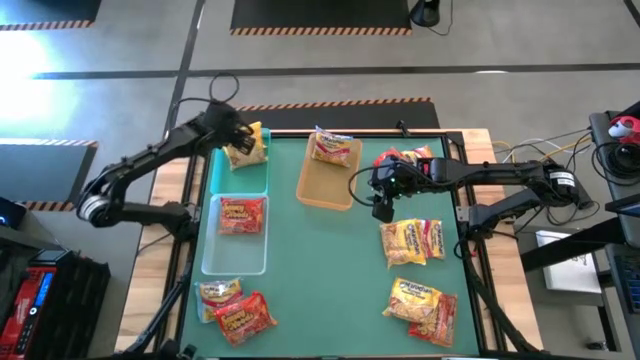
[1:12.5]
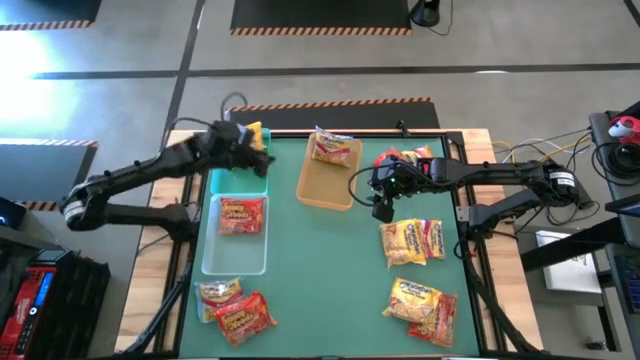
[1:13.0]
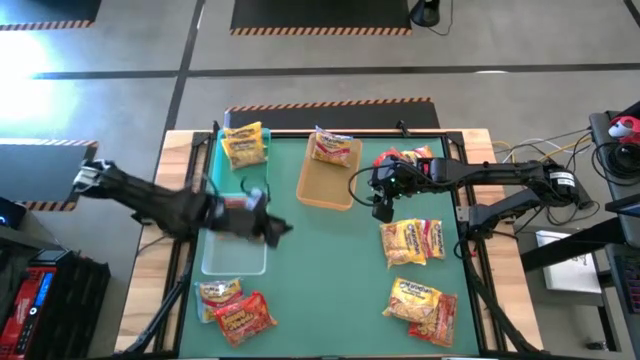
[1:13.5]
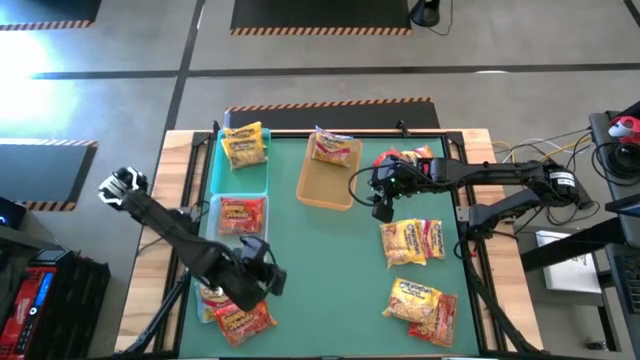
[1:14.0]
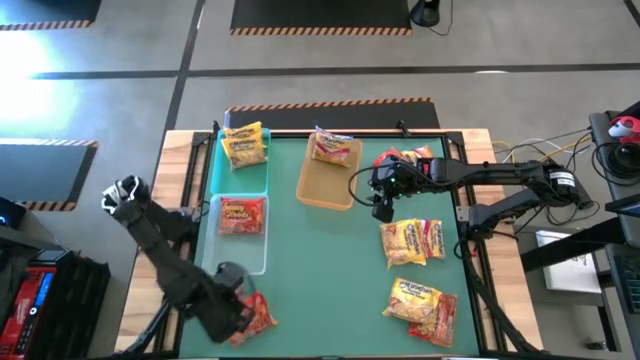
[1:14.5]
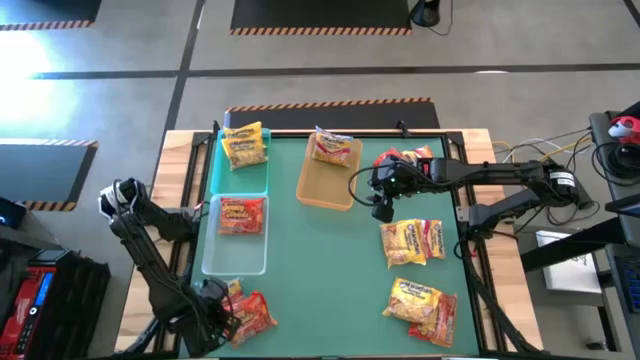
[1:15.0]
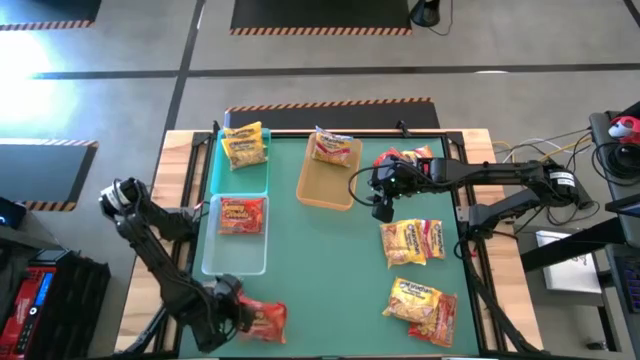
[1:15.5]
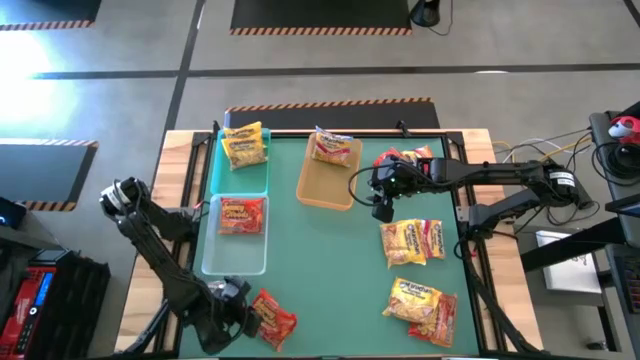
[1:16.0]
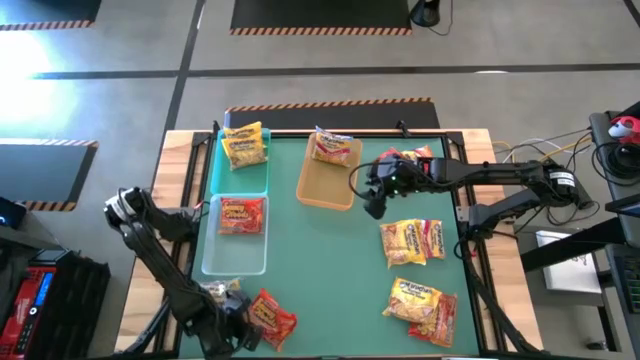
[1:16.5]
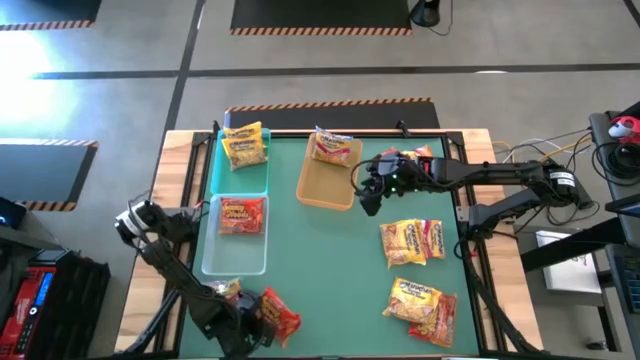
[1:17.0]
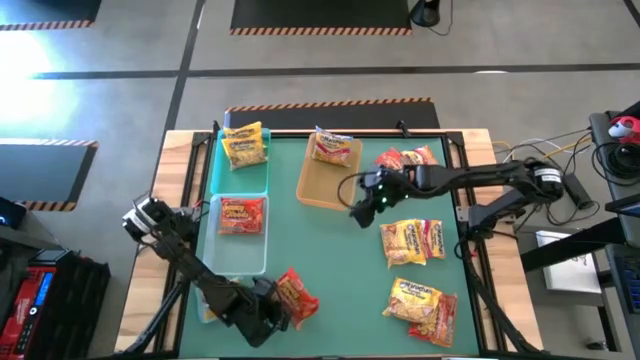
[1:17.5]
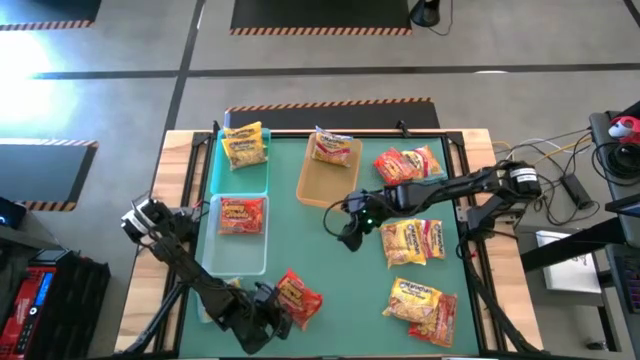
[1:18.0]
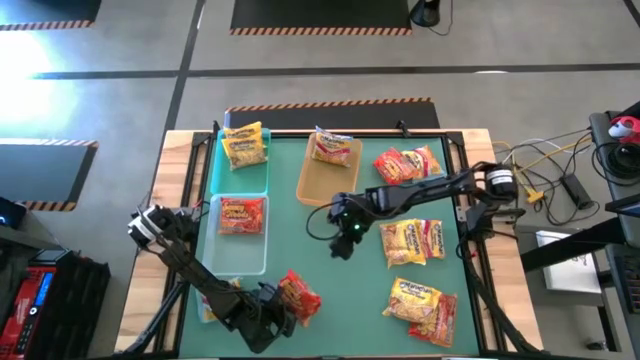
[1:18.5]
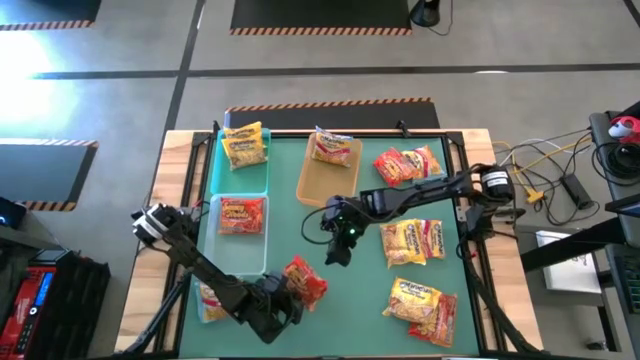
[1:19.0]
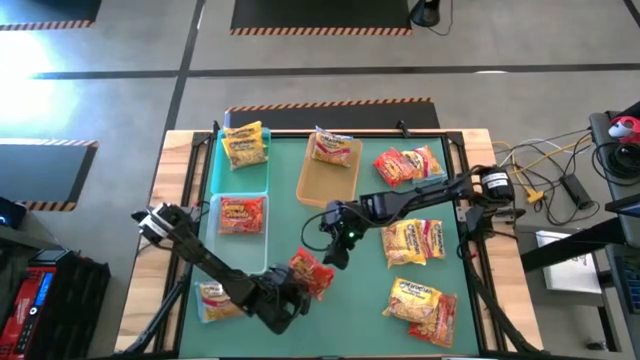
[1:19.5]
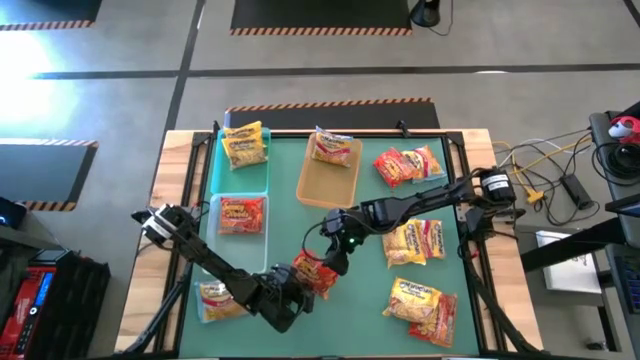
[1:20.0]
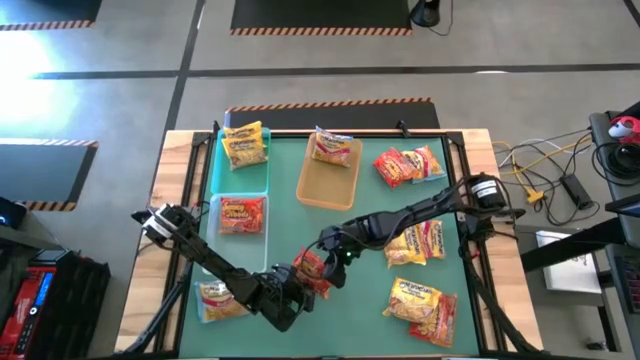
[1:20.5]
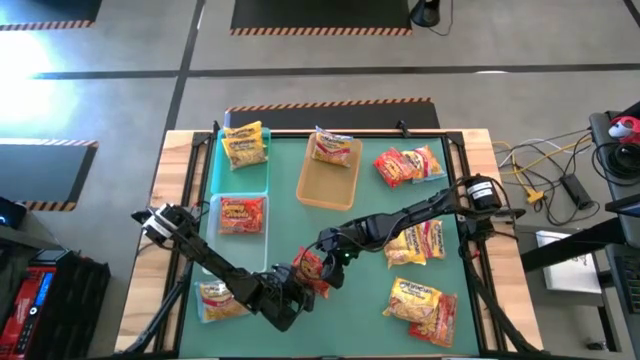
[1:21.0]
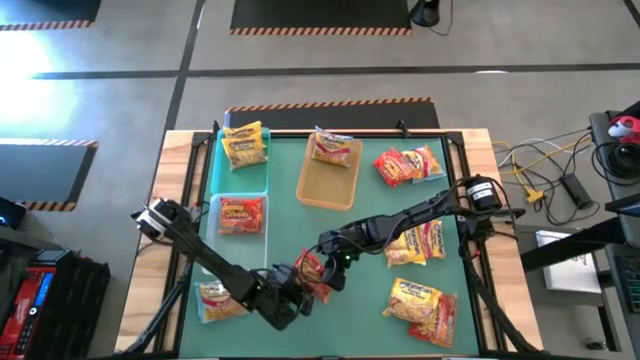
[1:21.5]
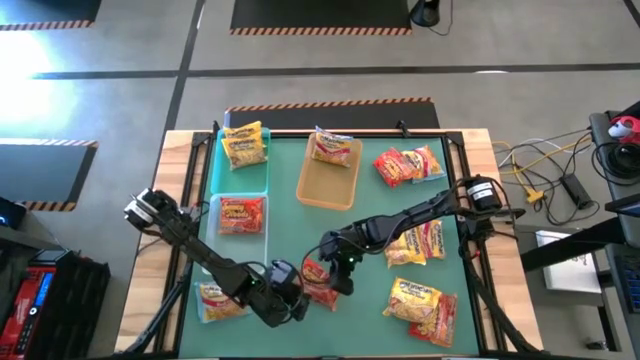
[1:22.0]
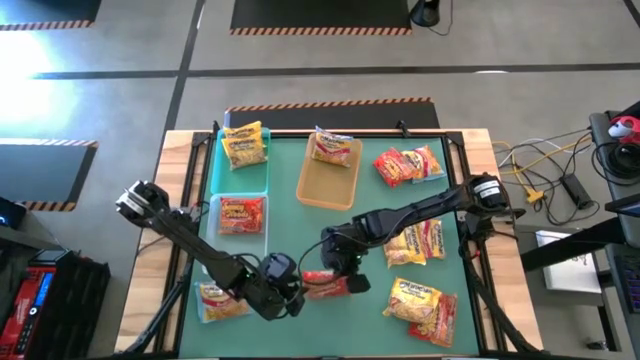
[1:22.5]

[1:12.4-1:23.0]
Task: Sort Maruchan noodles
Put the orange noodle pack into the white bin

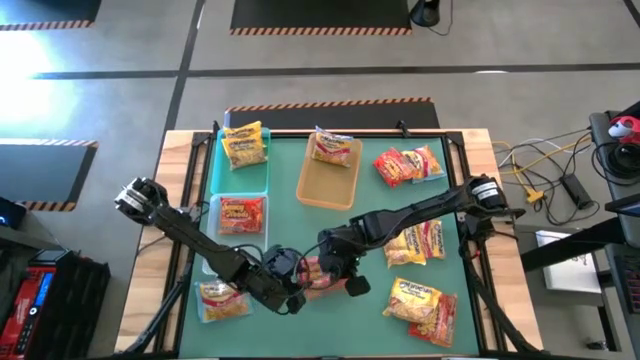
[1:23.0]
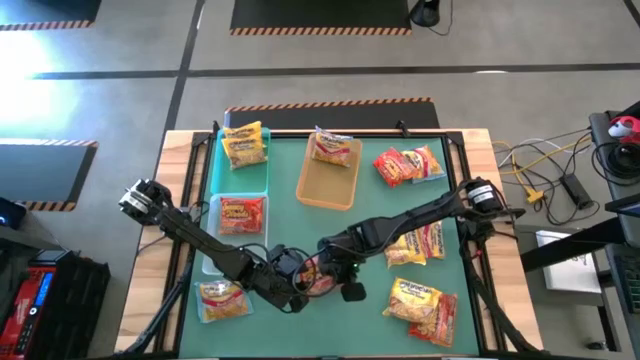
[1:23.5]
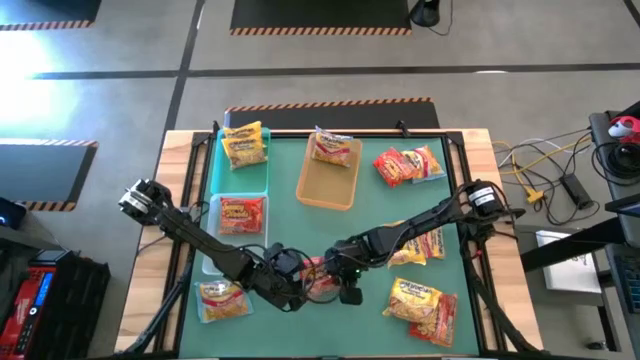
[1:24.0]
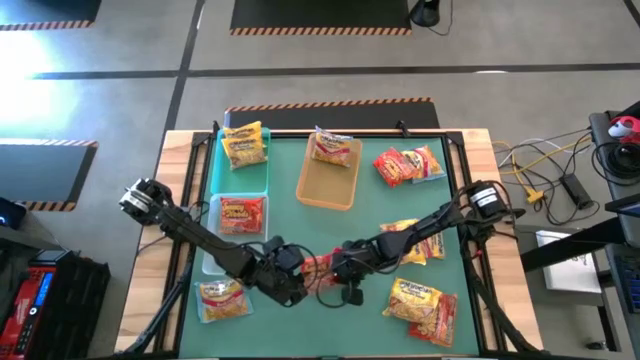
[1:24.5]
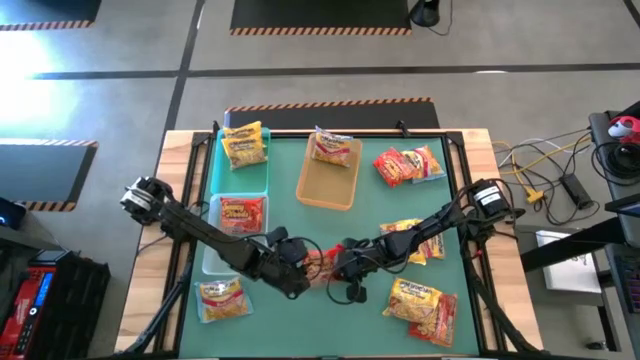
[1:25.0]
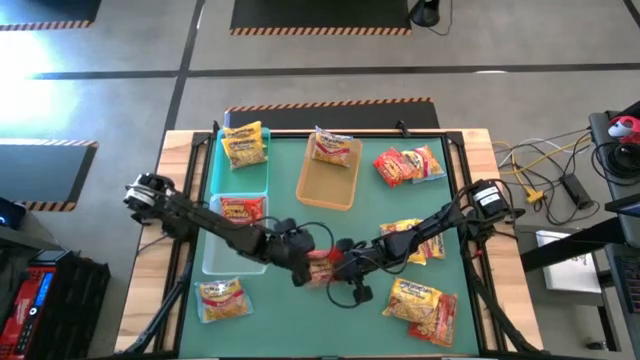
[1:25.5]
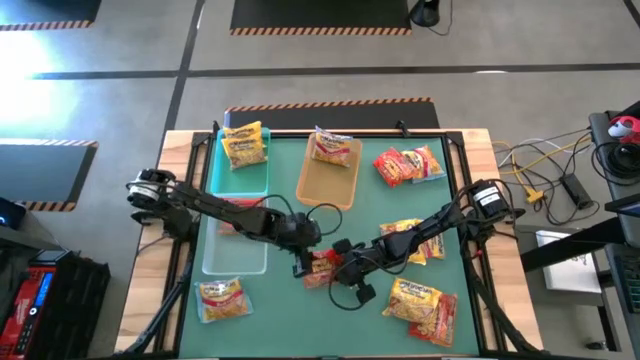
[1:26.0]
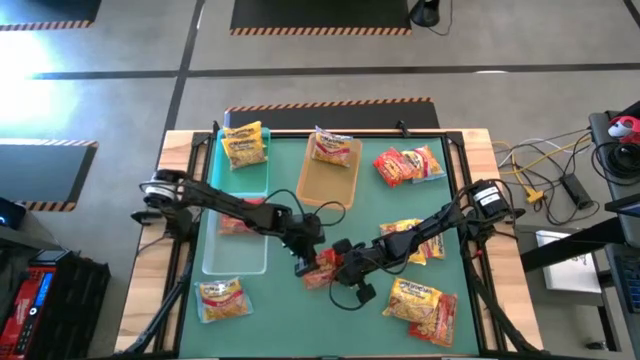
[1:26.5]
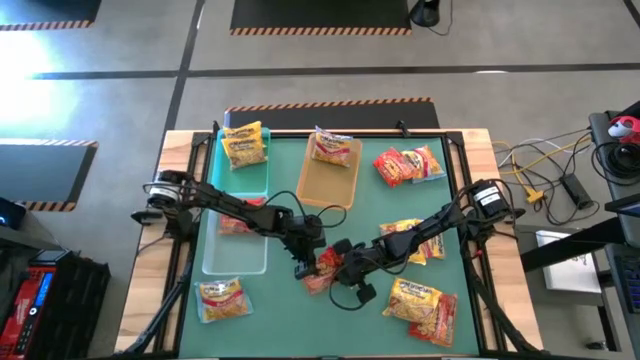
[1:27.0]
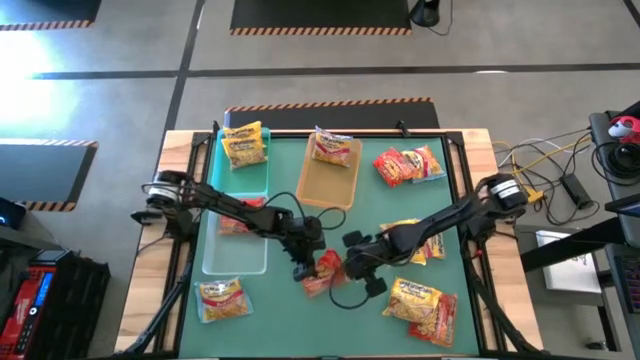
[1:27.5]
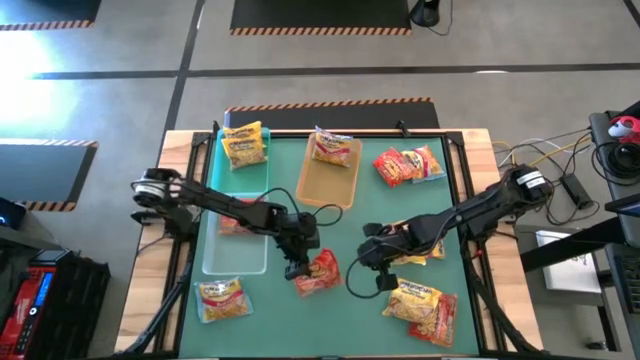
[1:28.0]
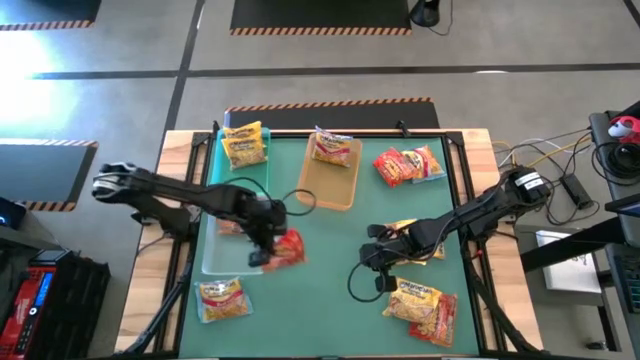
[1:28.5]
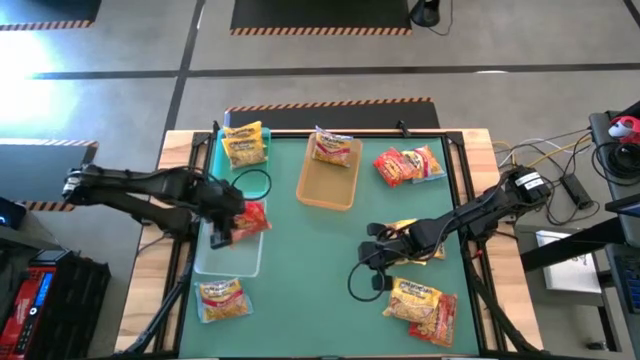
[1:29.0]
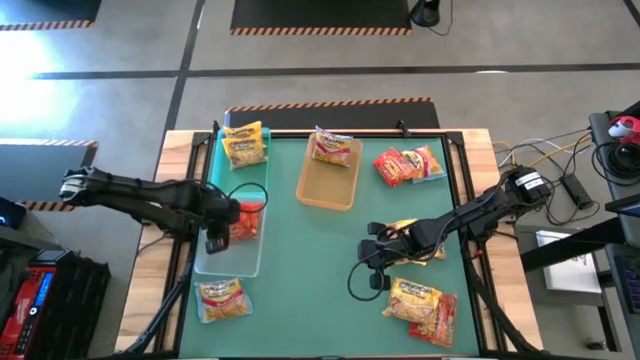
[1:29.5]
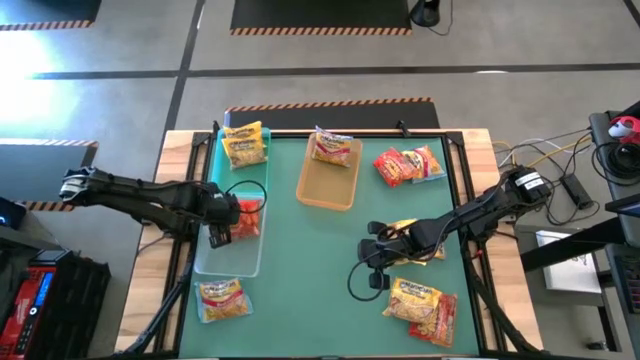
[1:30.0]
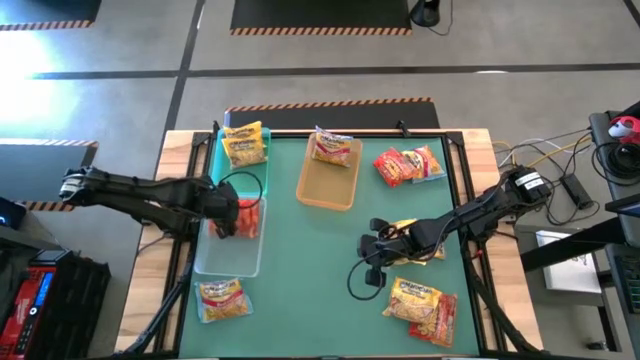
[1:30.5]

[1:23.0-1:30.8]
Put the orange noodle pack into the white bin

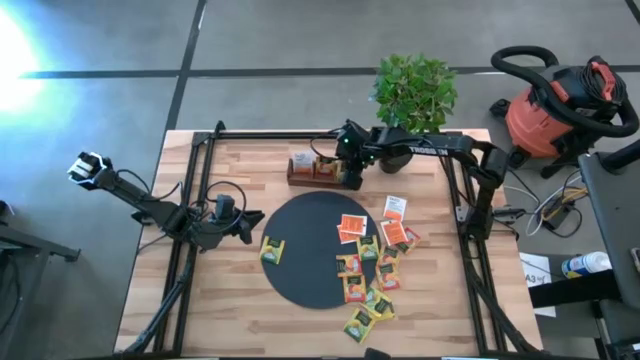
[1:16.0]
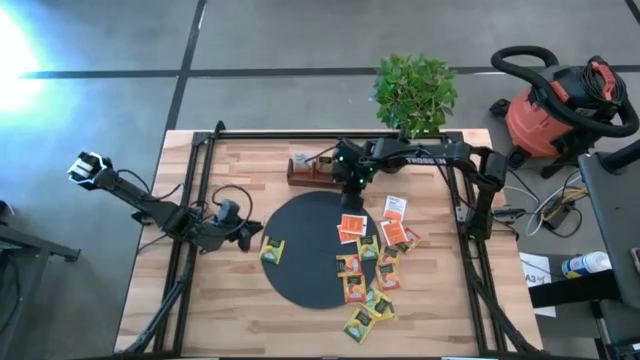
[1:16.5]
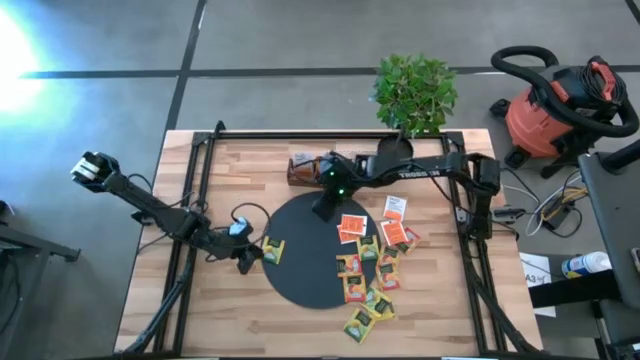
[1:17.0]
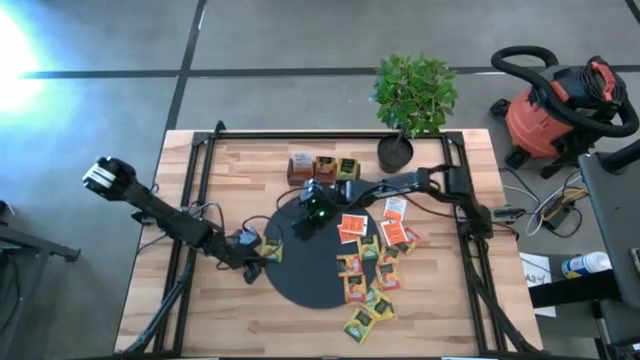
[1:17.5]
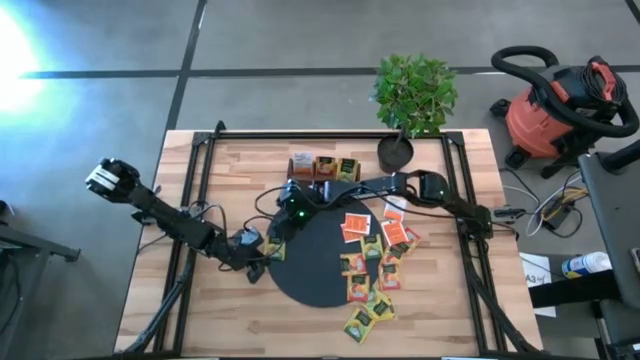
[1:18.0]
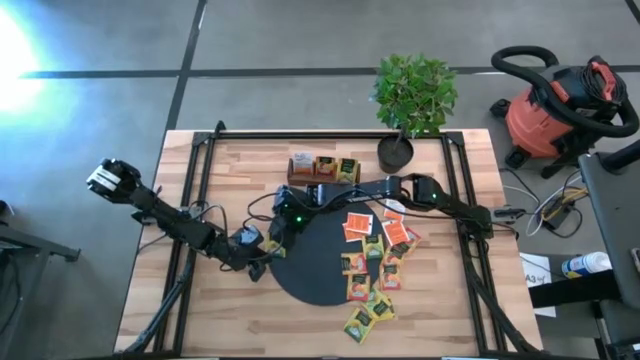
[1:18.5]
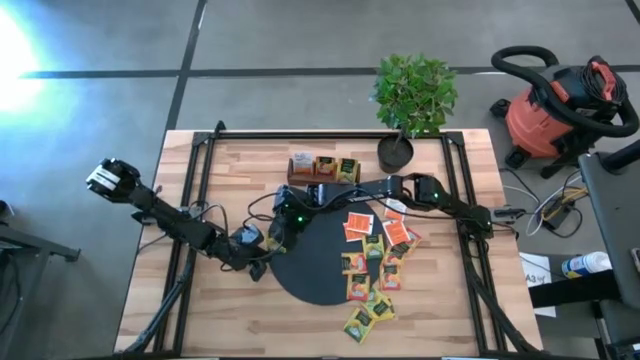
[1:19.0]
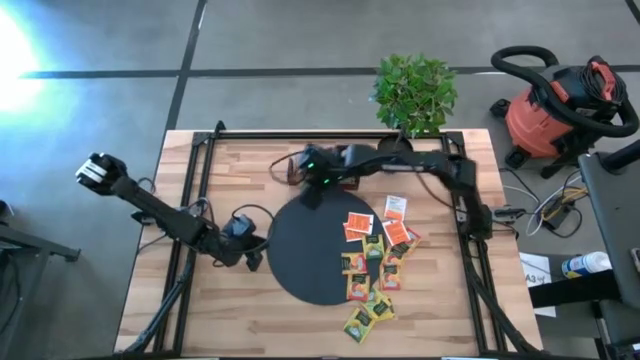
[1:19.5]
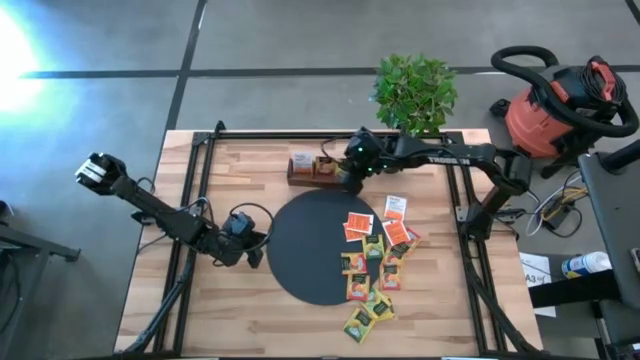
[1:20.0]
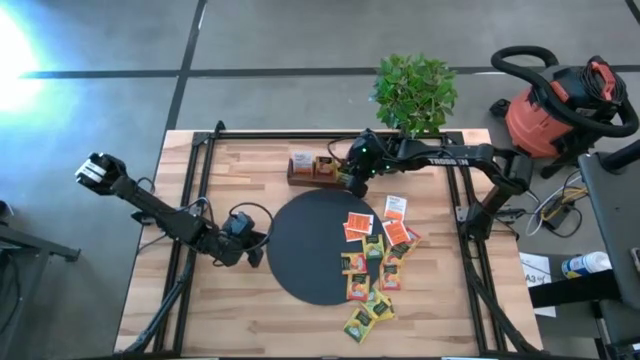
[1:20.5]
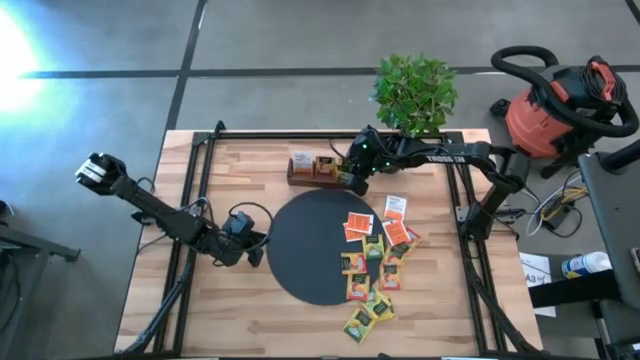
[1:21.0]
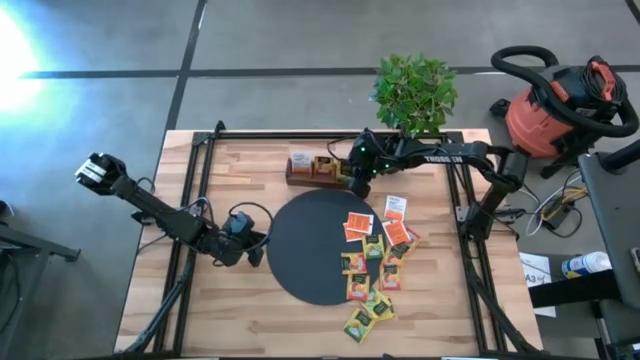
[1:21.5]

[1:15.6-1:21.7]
Task: Pick & Place Tea
Put the yellow tea bag into the right section of the brown wooden organizer
